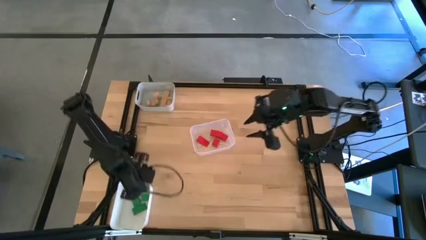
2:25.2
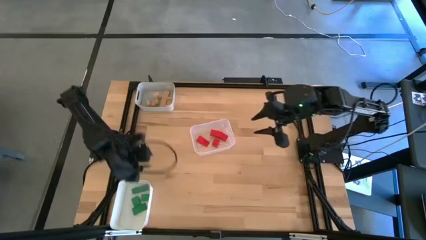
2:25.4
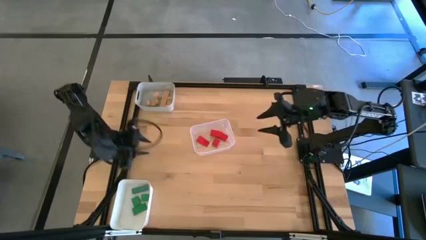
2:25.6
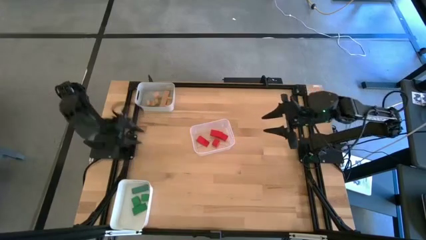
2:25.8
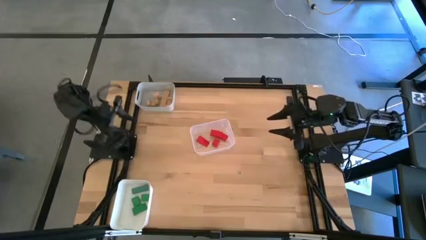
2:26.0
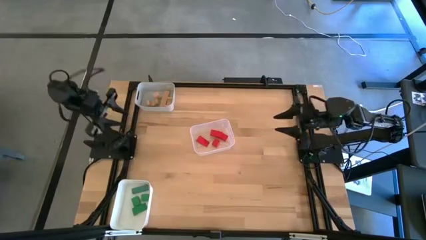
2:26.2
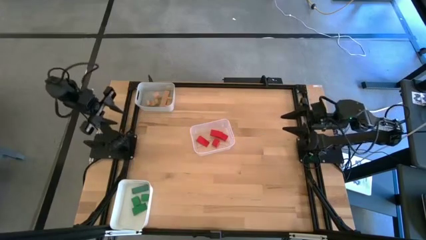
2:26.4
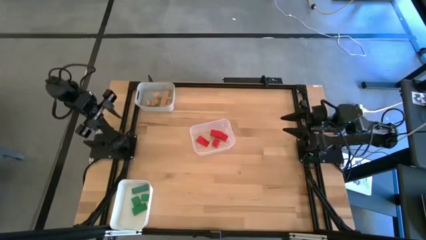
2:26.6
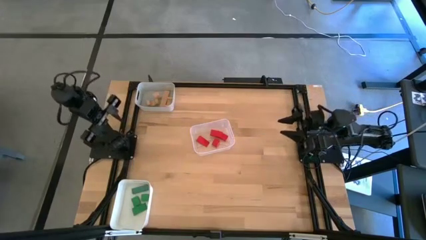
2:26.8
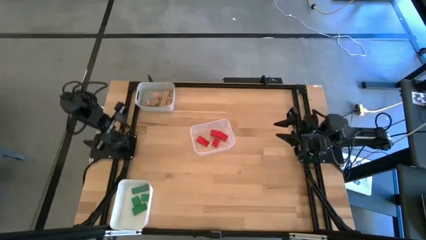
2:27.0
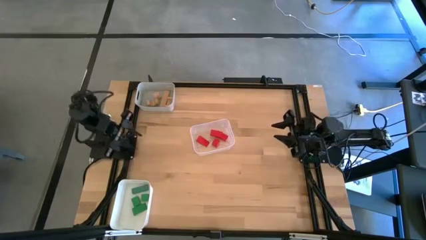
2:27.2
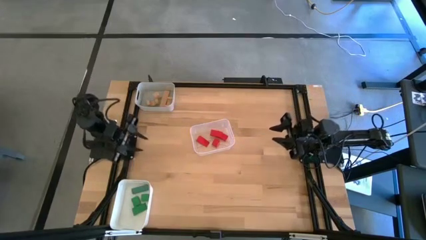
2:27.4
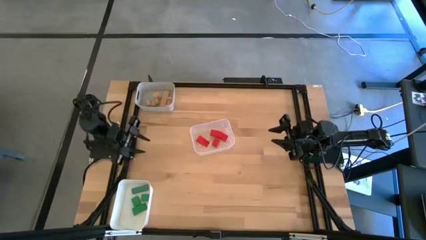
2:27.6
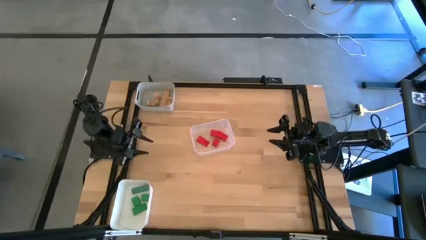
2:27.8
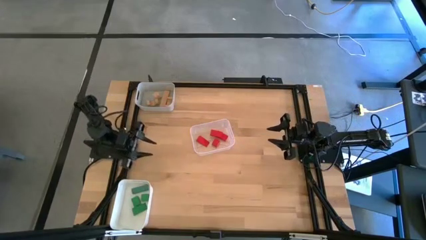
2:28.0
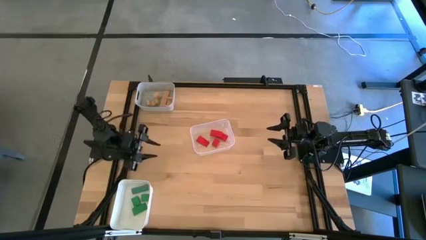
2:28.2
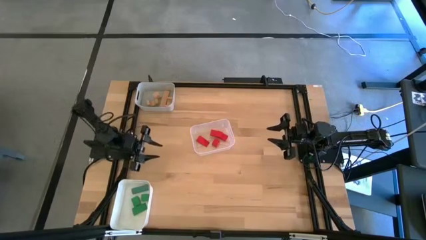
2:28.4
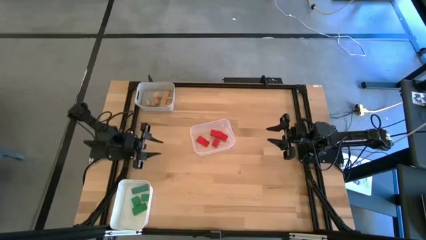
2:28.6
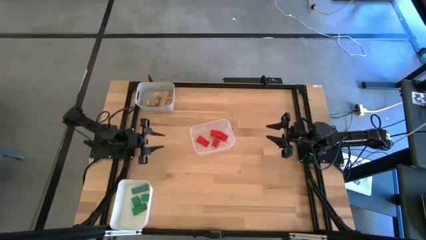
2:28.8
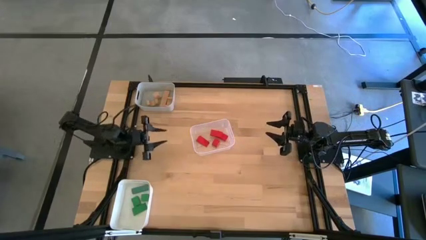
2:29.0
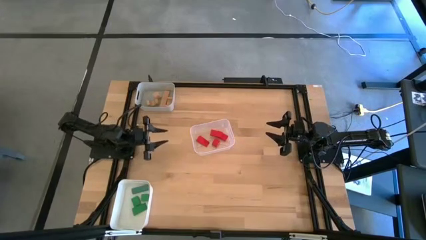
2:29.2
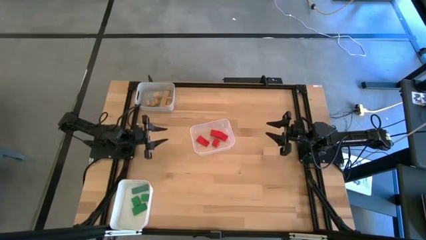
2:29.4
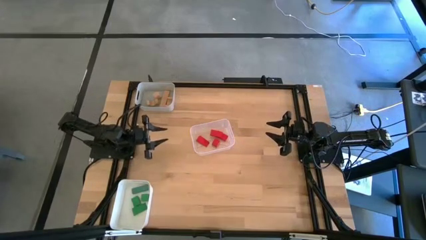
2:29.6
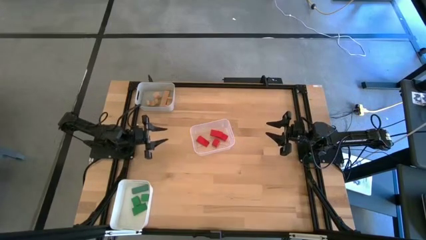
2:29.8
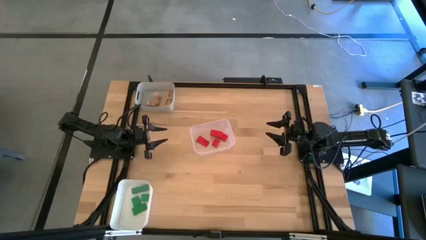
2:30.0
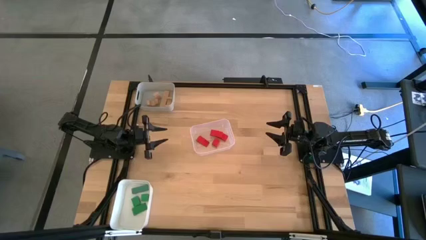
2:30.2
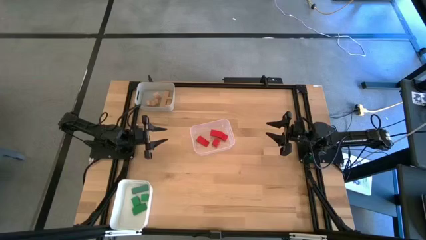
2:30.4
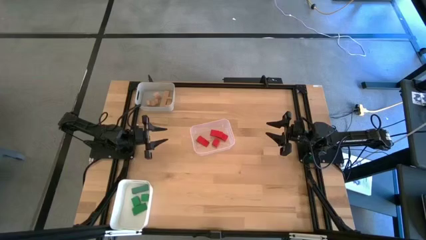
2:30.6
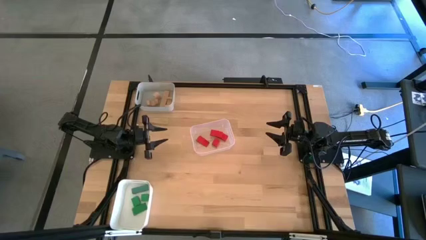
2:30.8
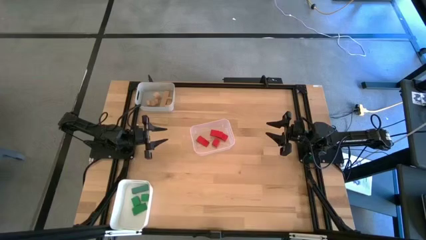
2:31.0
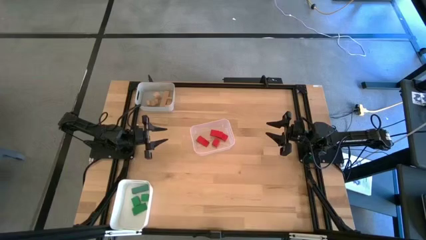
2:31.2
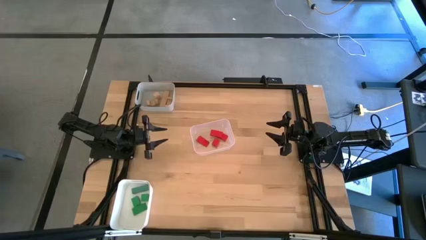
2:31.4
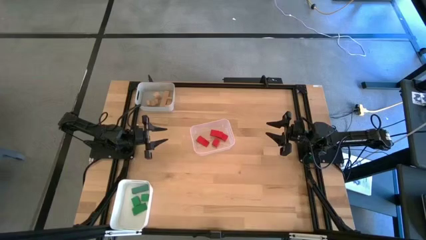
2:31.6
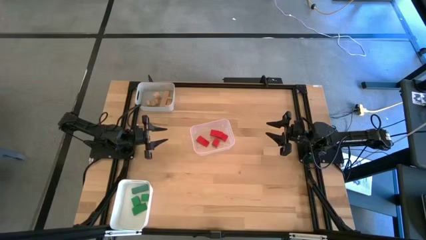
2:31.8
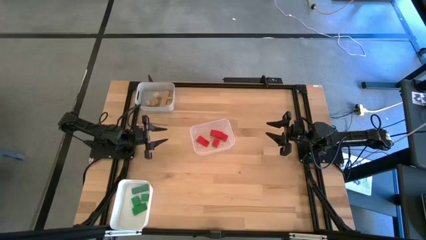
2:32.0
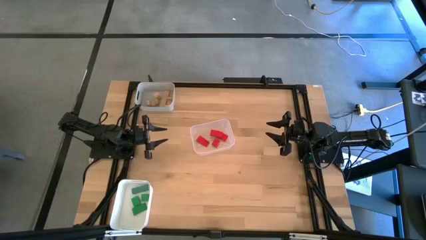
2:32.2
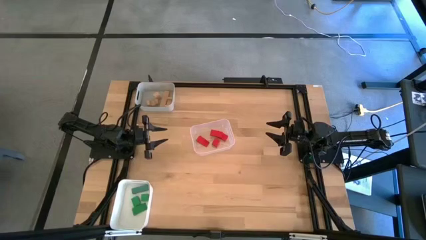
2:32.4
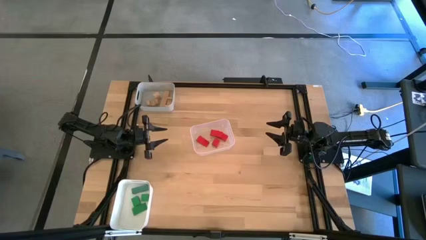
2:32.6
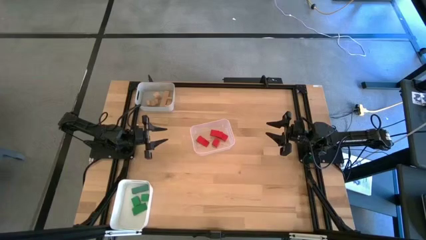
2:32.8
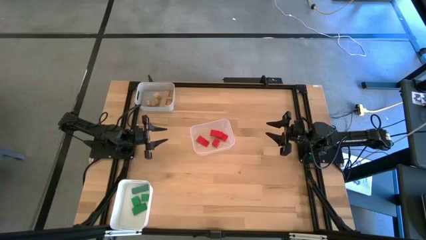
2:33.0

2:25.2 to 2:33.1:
Task: Sort & place blocks by color
Return to Home Position

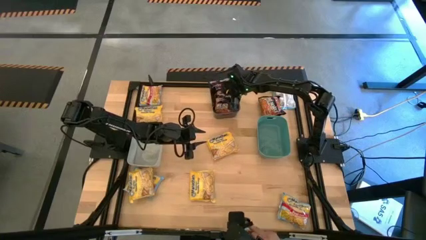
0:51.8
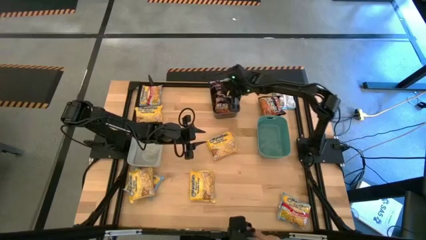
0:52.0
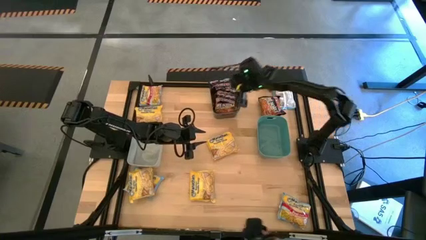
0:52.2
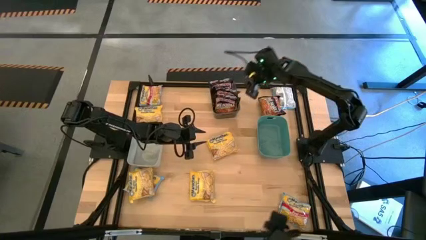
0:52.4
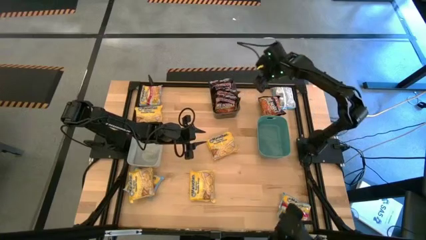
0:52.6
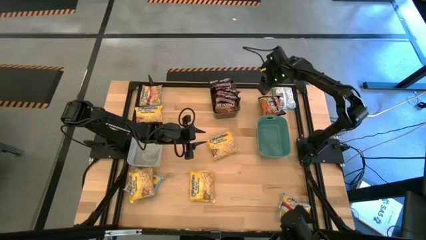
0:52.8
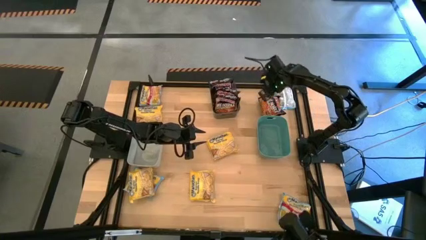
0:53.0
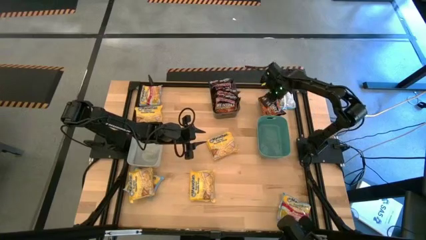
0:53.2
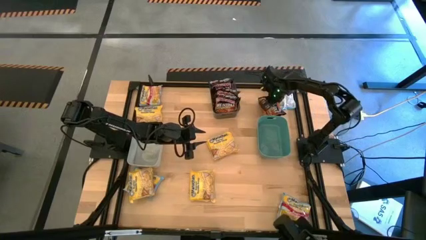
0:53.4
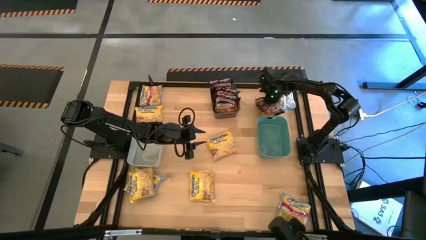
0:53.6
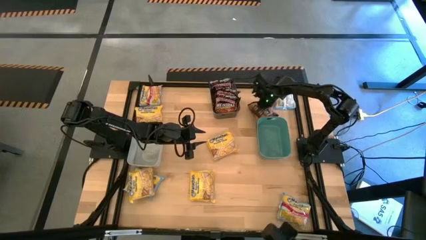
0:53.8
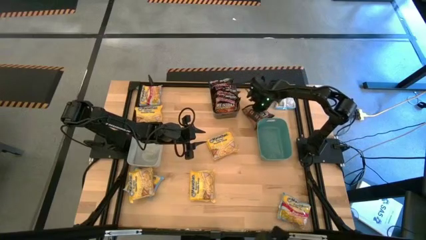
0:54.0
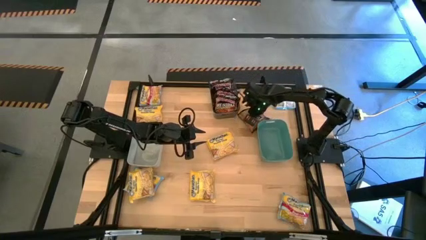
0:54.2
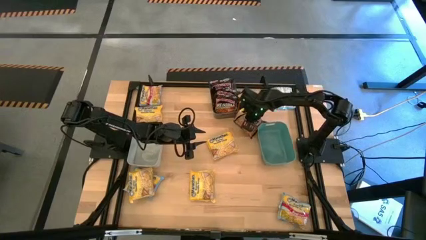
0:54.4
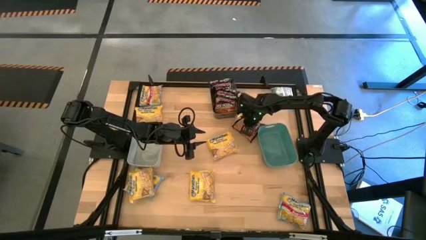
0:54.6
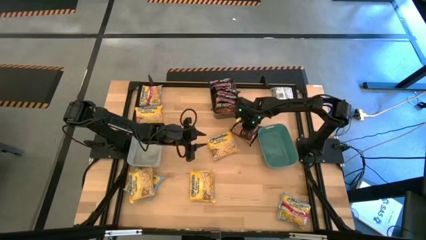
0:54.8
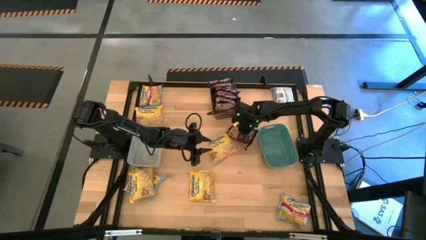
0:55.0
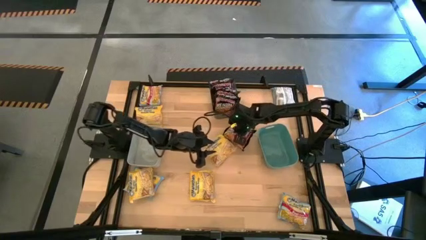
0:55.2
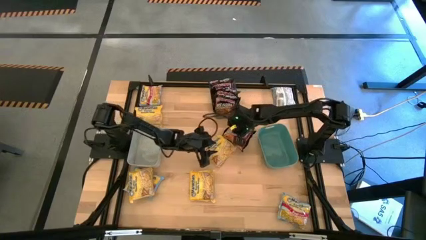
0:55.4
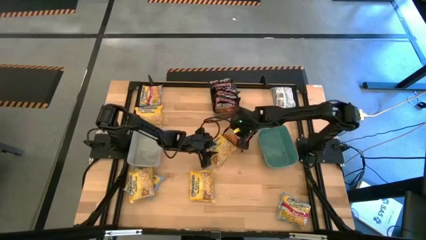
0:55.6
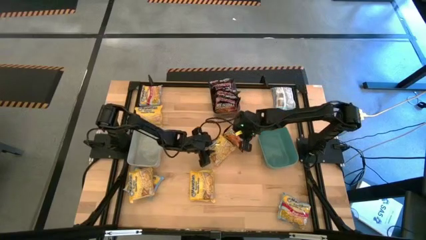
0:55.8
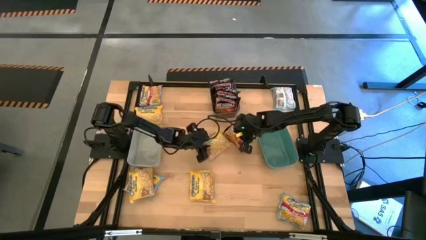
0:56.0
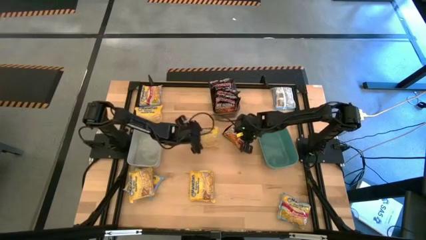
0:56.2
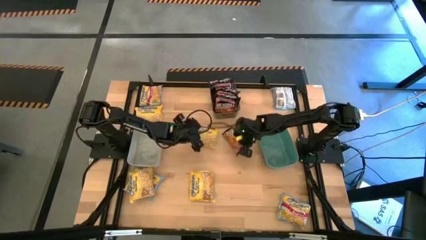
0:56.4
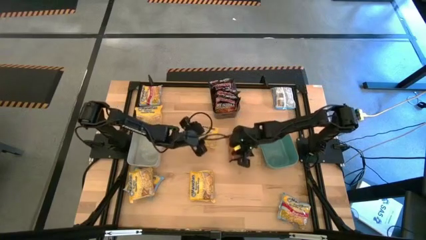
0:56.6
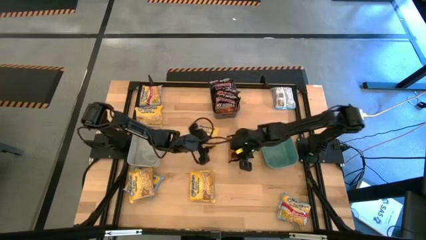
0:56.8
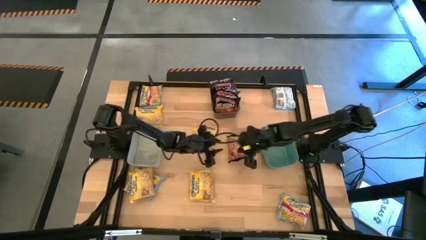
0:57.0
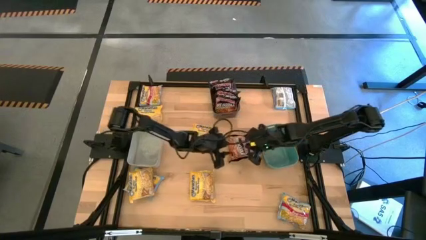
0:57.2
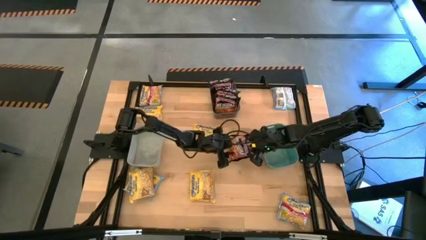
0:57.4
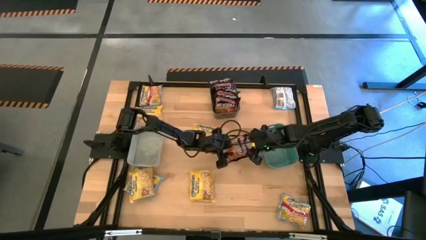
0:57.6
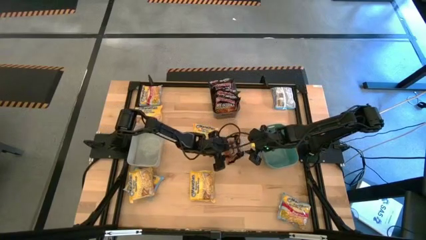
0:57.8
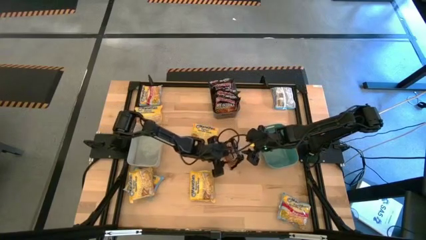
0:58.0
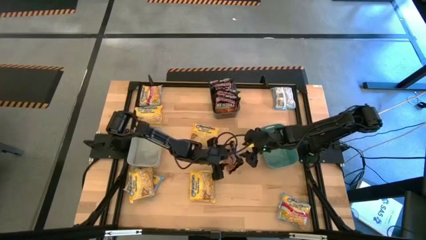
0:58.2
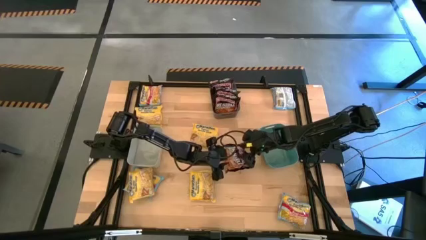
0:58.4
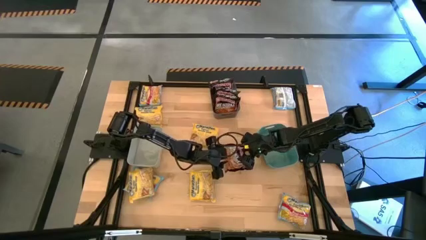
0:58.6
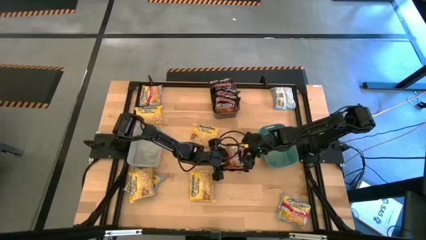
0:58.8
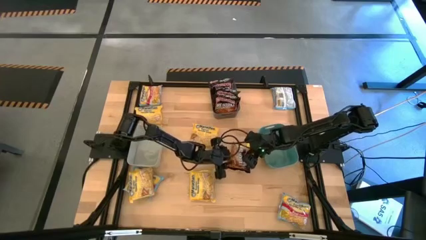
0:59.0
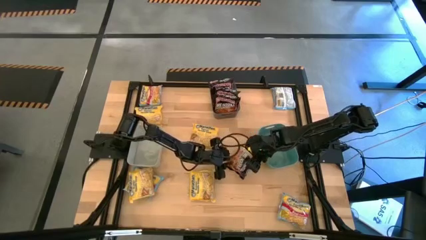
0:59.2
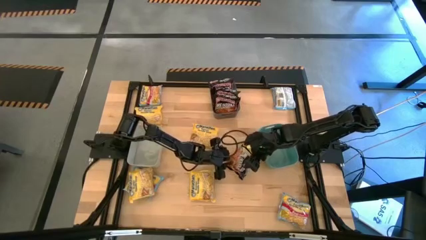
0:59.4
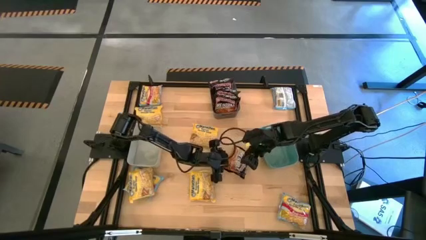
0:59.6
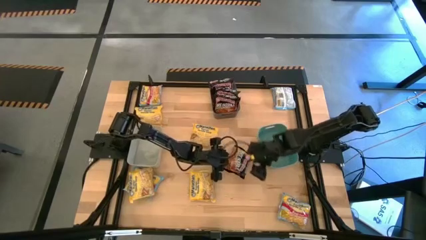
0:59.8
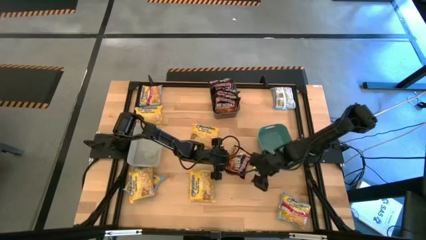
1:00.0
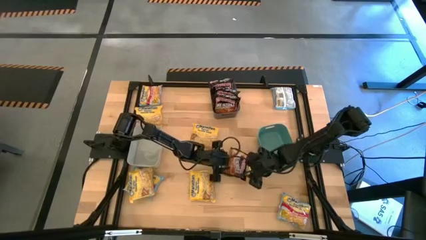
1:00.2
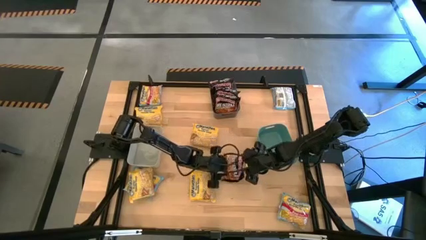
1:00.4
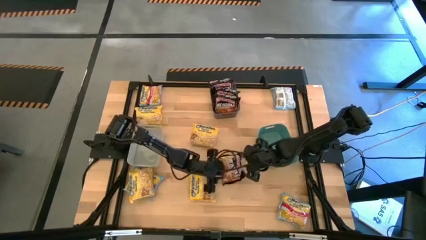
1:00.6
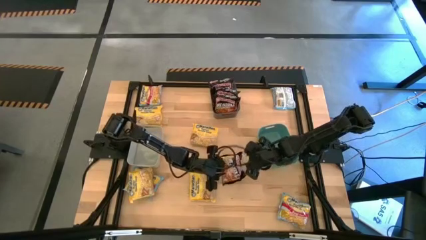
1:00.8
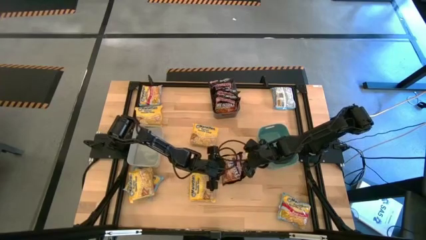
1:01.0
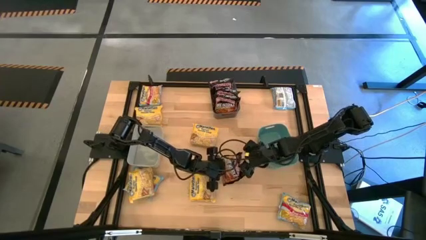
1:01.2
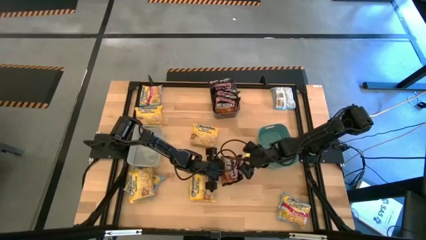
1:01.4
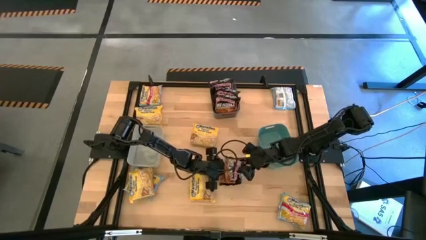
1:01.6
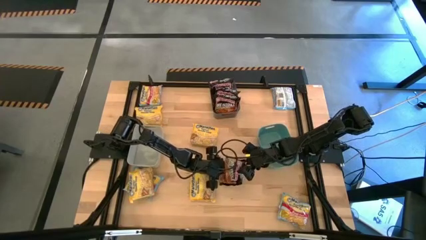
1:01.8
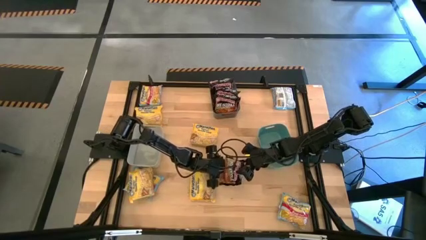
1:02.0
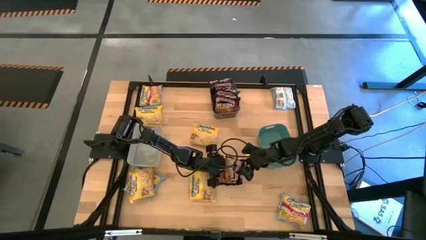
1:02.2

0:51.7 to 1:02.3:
Task: Sort Maruchan noodles
Put the black noodle pack into the black bin
